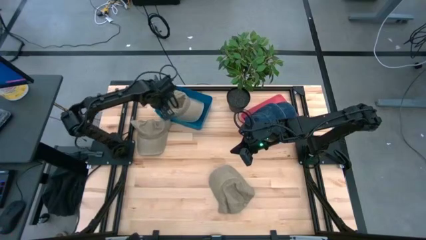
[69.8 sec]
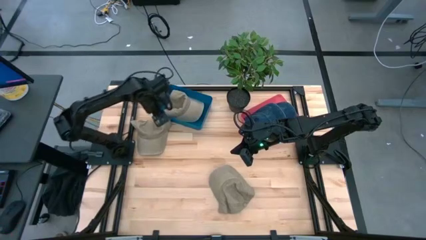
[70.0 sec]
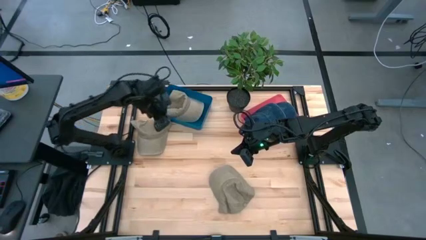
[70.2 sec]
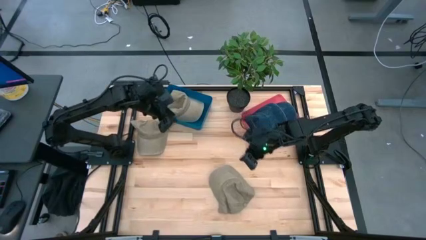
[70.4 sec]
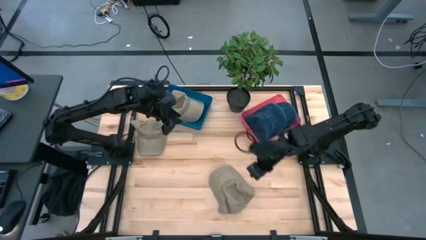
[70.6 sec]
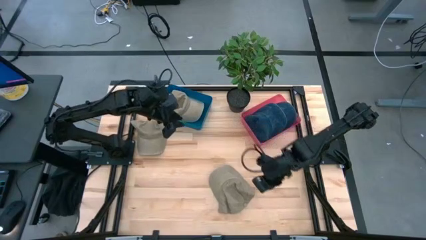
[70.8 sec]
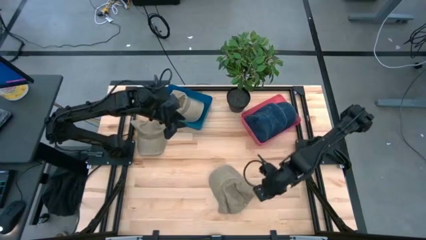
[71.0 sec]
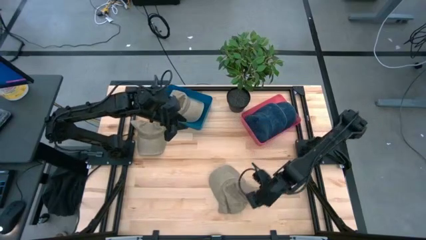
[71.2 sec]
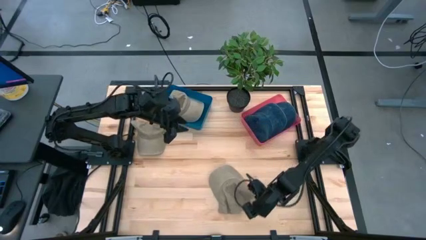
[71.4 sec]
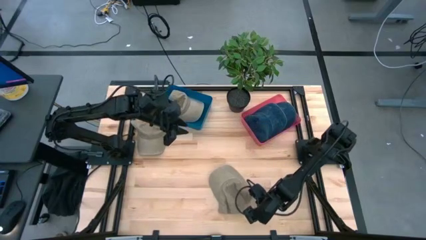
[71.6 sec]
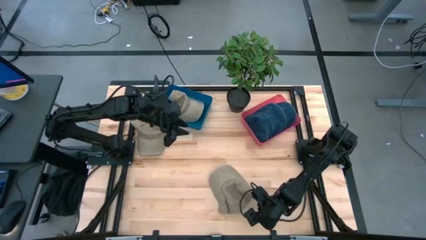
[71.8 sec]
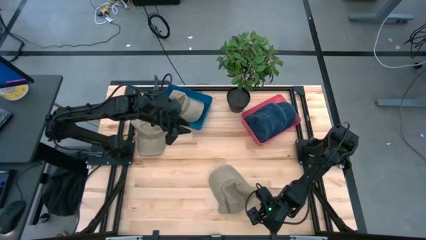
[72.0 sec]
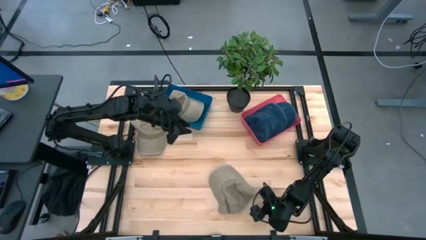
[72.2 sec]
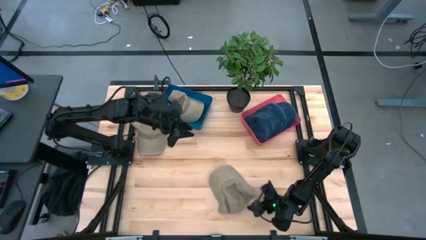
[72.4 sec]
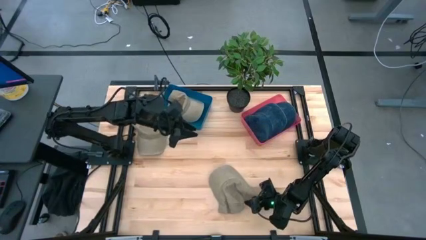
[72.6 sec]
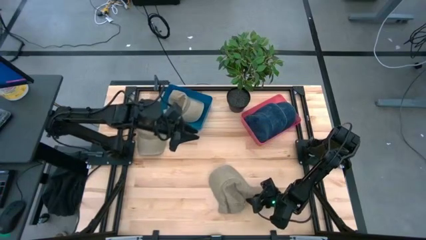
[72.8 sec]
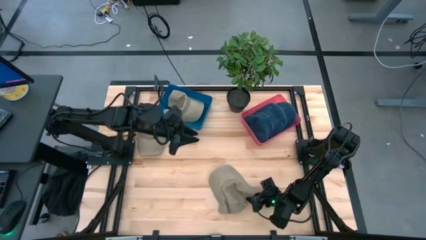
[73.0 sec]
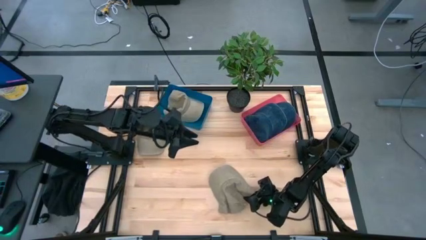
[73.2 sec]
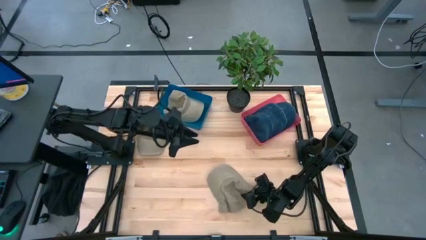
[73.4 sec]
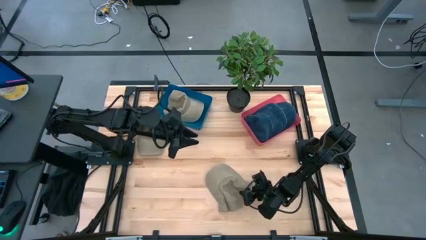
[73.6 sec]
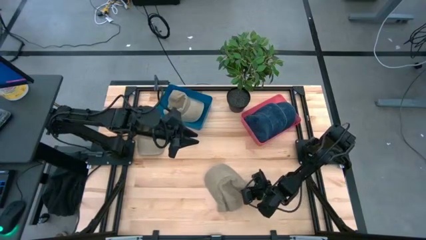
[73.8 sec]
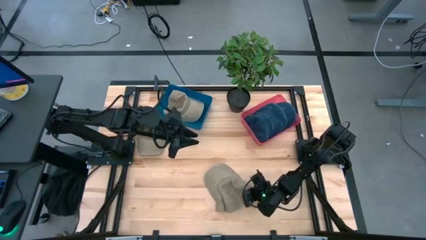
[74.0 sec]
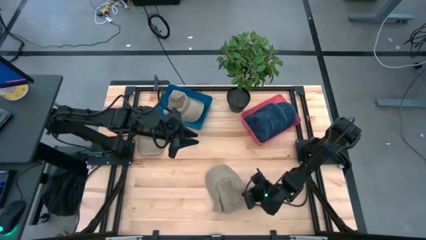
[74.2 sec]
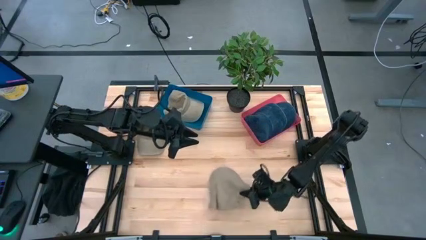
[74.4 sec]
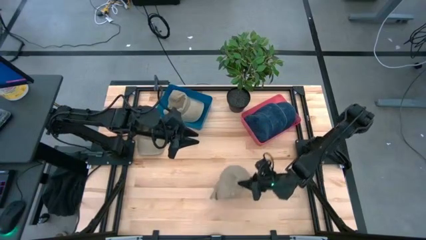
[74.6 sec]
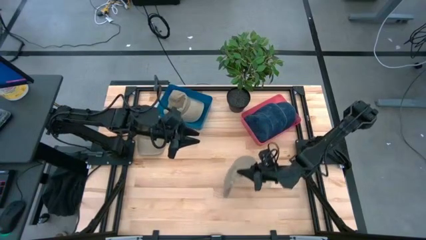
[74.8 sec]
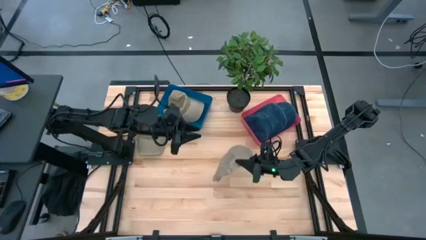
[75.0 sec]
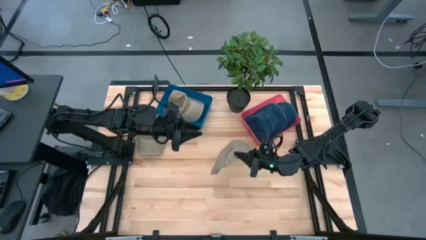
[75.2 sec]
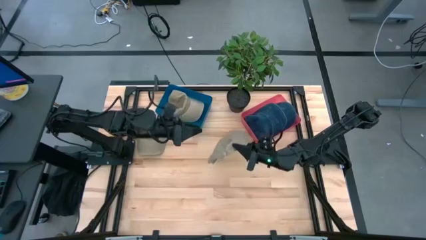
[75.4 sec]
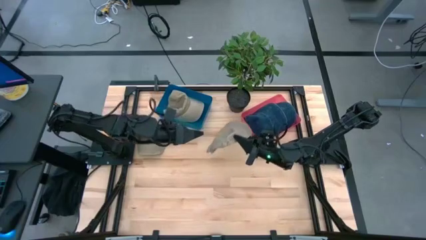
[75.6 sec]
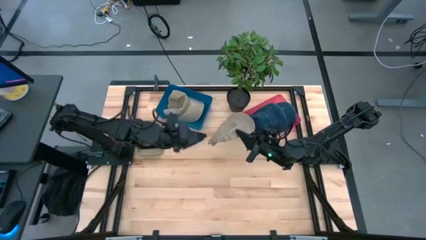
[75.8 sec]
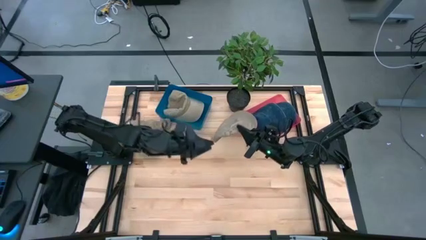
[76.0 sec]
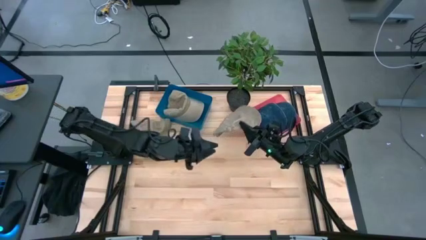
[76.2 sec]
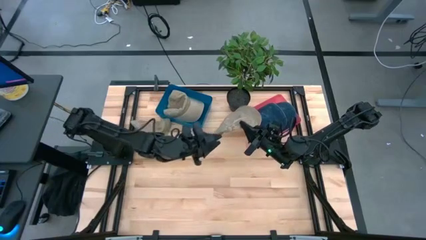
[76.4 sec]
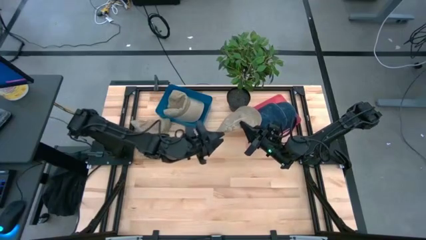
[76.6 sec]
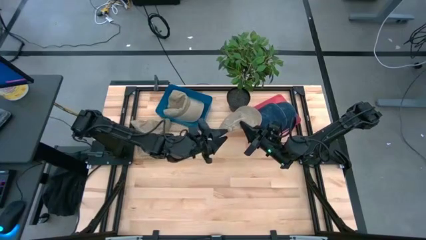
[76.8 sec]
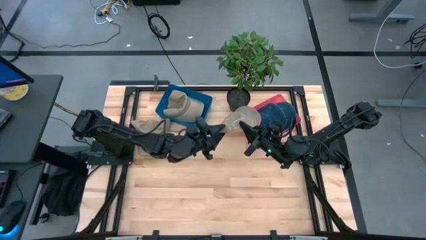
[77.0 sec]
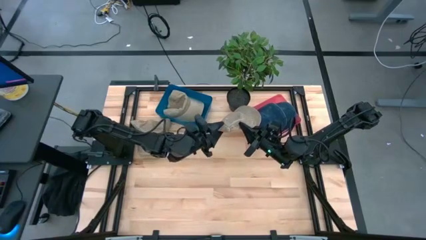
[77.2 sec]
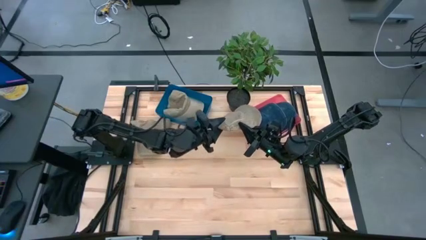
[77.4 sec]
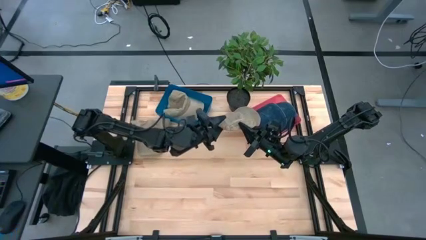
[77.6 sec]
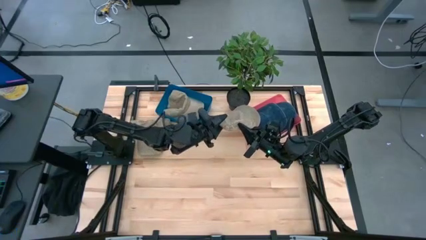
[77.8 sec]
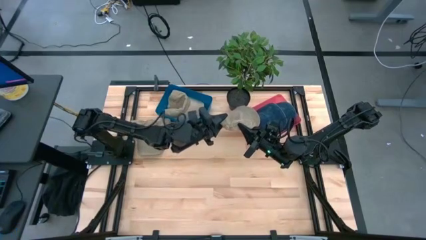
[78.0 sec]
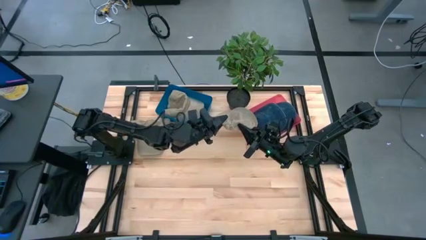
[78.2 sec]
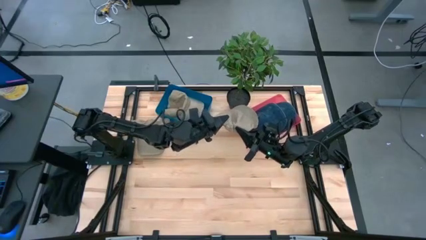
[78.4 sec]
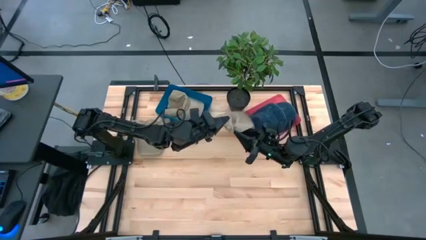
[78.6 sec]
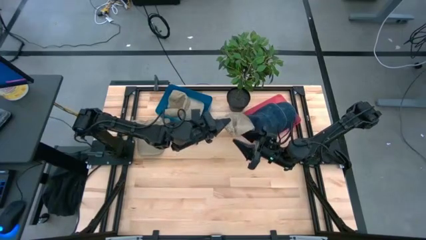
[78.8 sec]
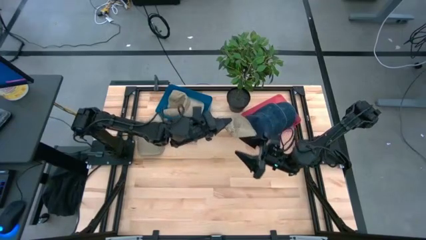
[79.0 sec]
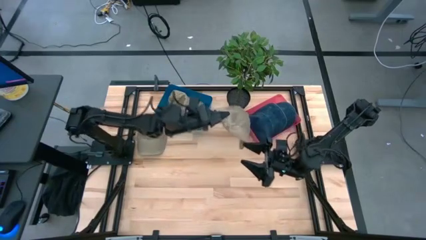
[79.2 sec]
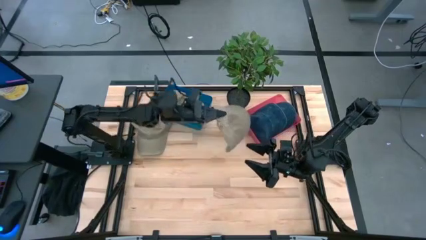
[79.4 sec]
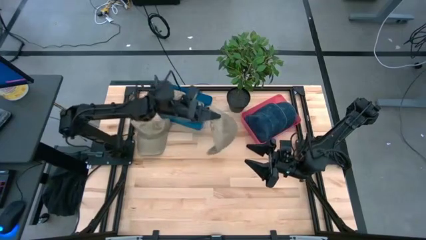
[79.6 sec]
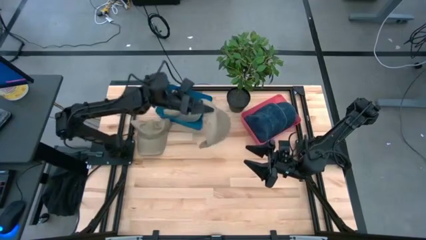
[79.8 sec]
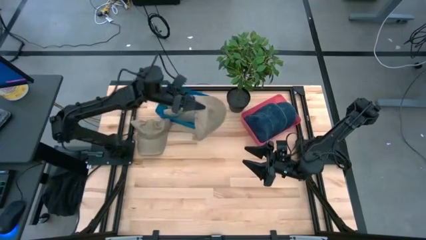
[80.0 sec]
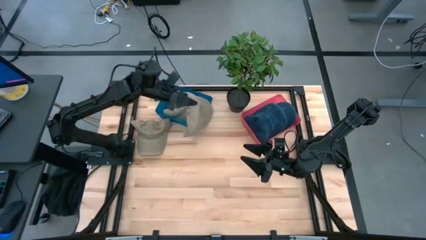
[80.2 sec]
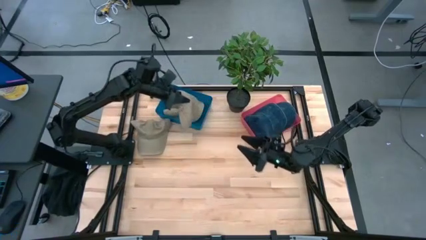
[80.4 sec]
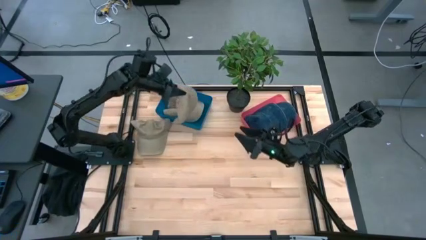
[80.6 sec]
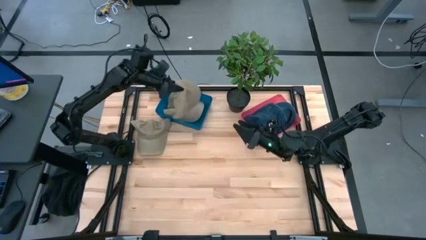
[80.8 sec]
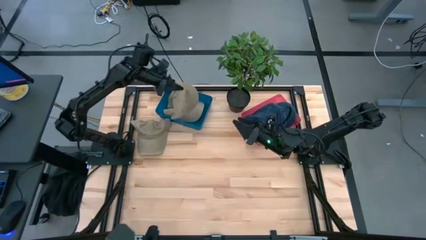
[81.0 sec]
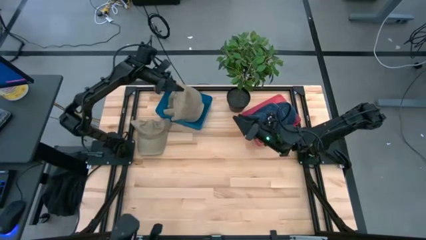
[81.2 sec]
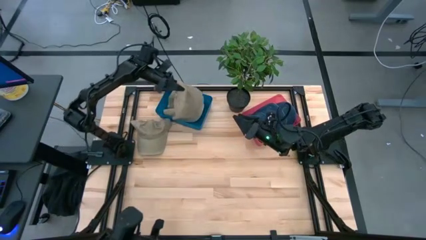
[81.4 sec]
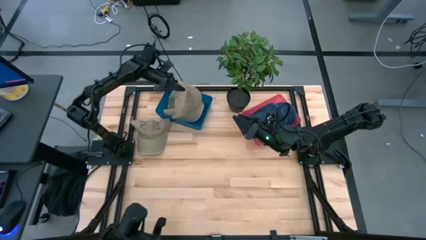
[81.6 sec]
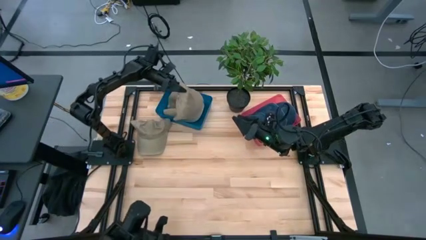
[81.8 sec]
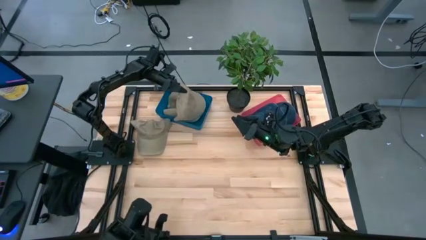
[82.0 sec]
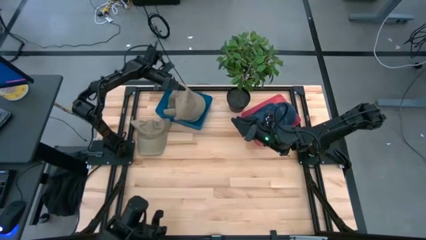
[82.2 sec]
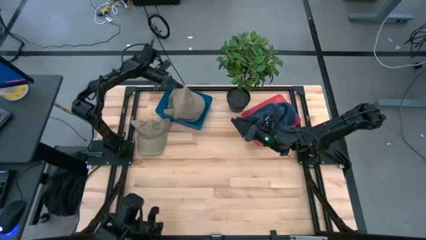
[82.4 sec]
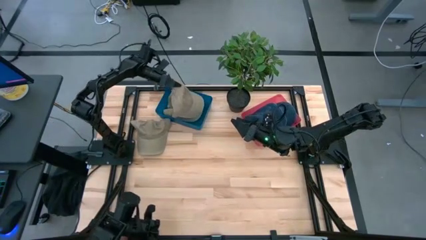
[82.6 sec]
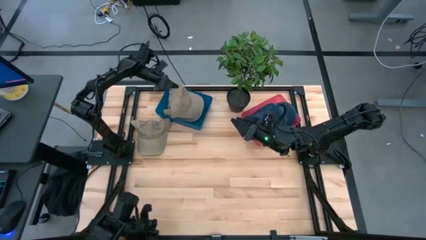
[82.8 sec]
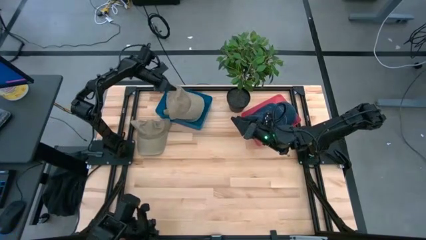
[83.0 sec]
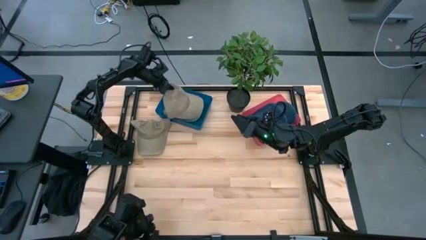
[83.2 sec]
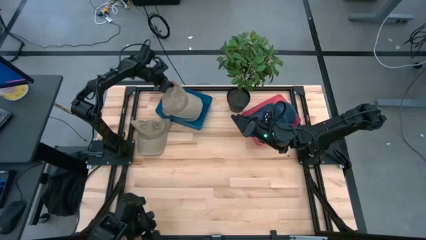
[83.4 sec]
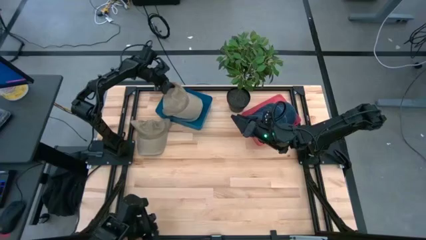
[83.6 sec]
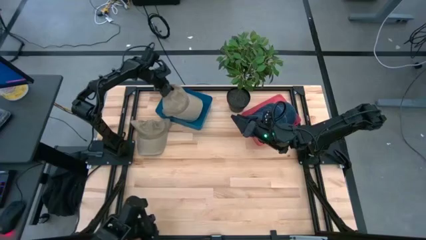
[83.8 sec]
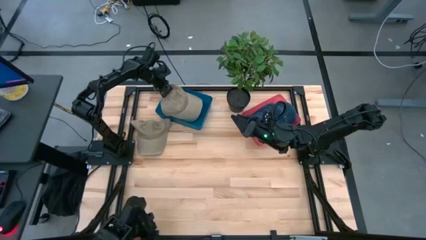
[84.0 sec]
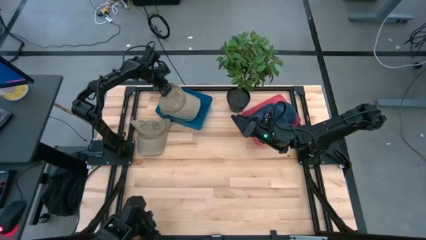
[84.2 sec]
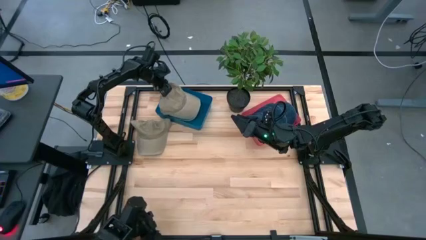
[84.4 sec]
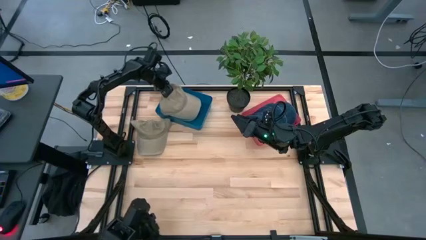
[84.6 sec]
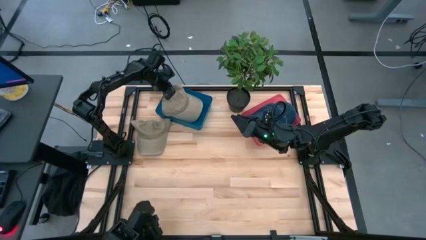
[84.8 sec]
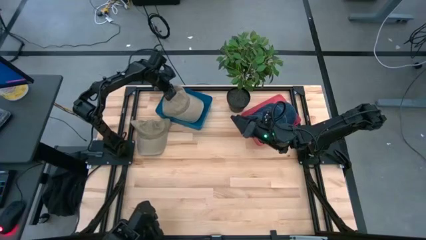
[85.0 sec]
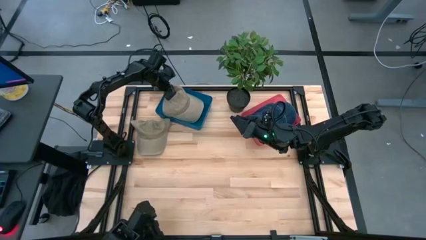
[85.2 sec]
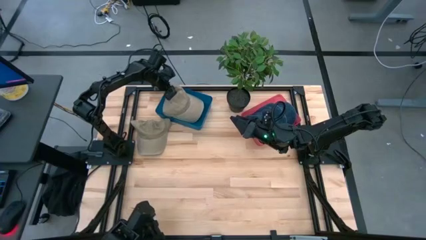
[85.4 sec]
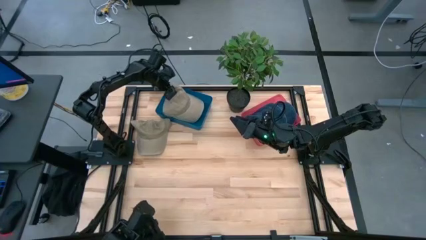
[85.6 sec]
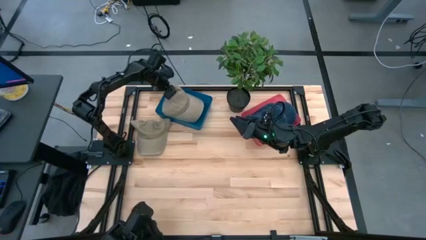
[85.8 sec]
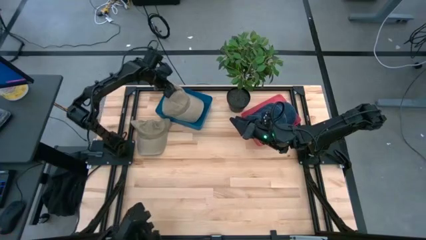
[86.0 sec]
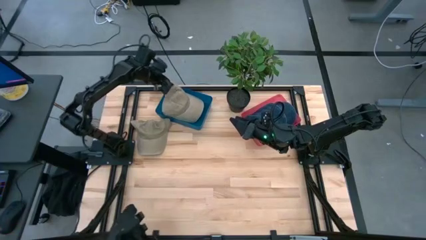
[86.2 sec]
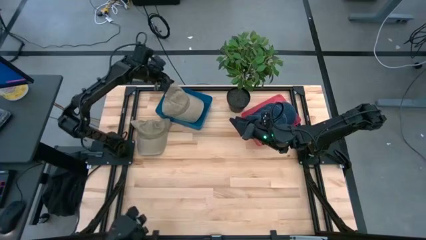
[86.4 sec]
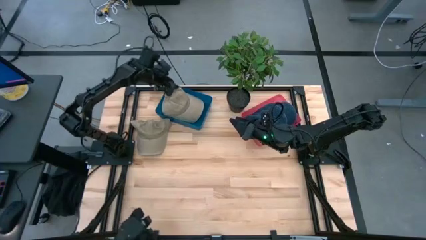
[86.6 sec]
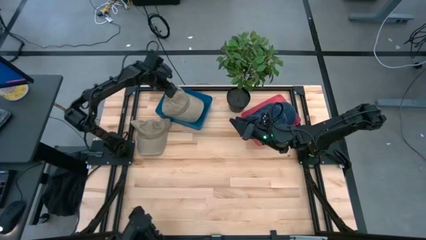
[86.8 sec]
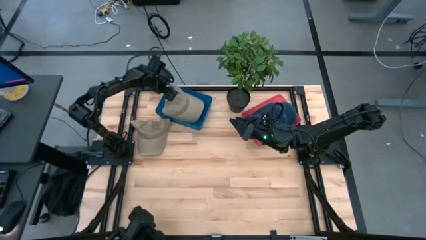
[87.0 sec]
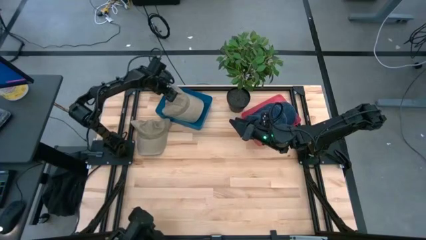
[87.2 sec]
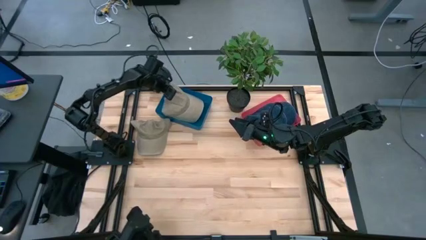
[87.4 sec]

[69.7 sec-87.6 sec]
Task: Pick & Place hat
Put the bottom brown cap into the blue bin
